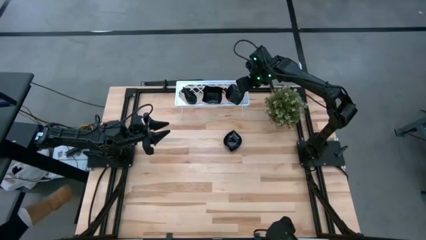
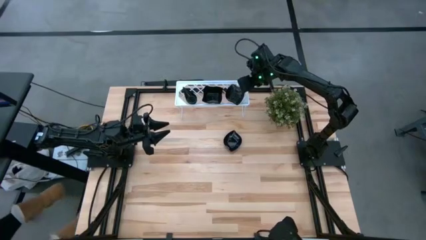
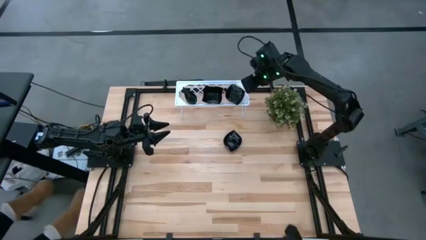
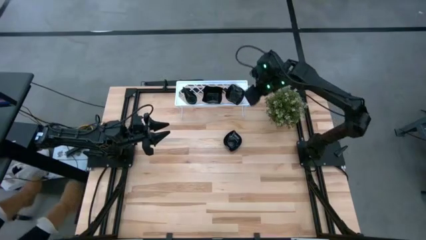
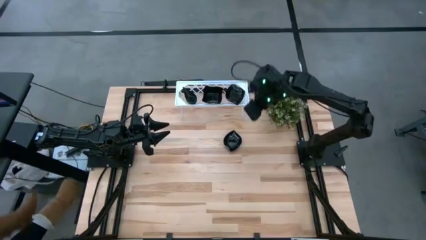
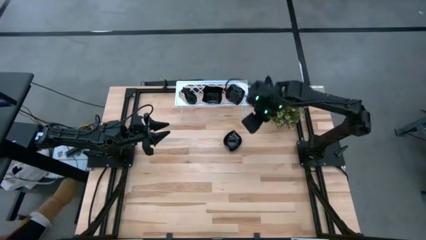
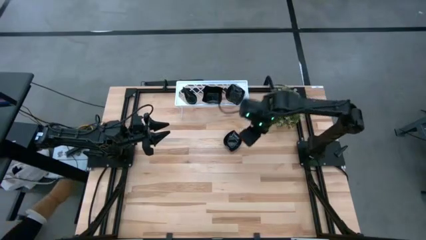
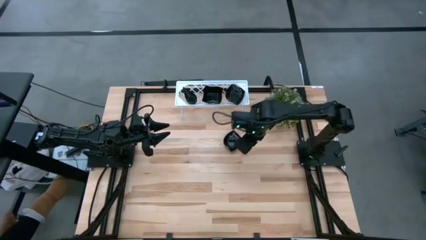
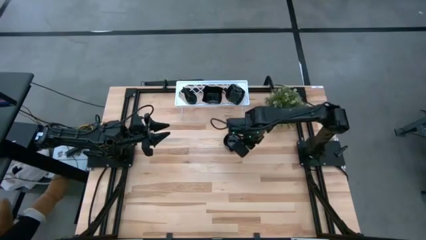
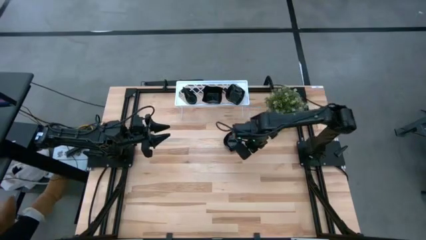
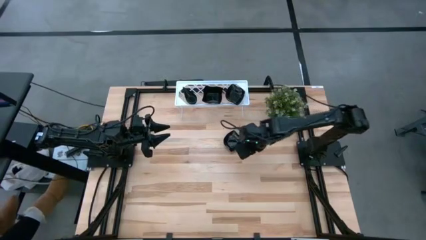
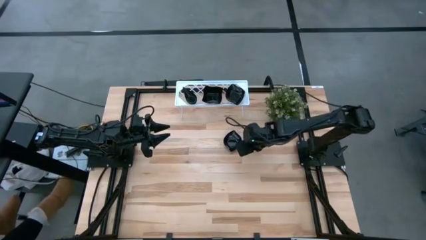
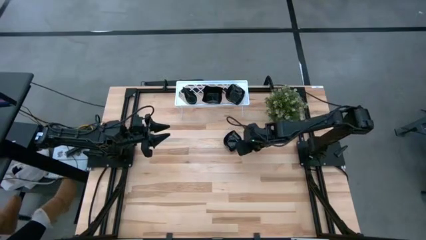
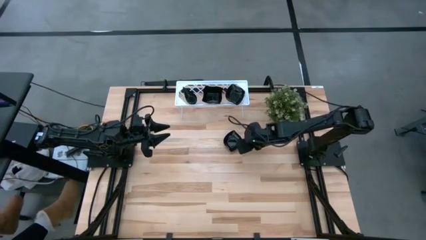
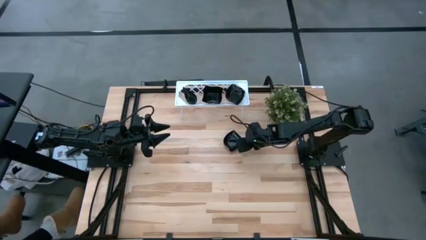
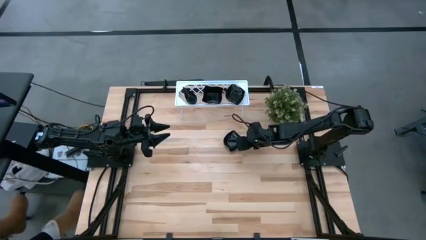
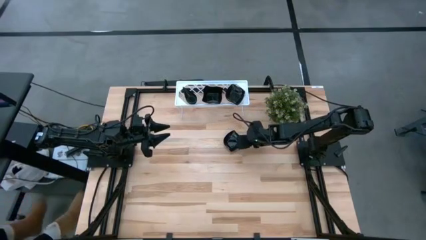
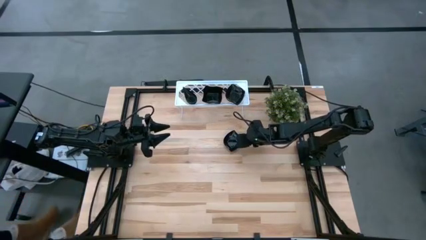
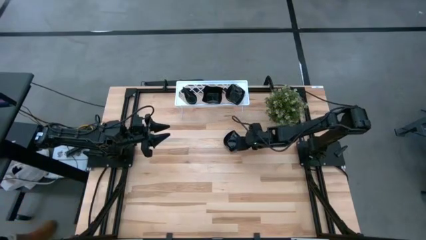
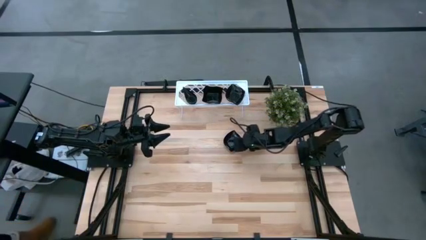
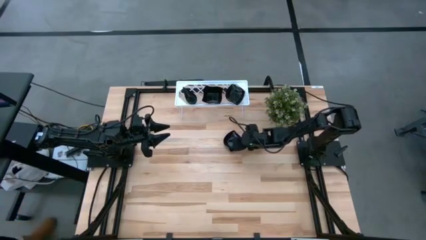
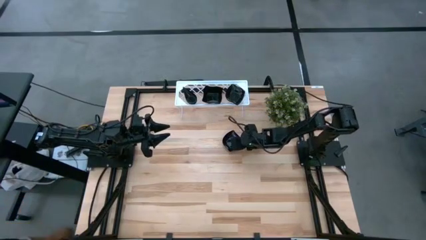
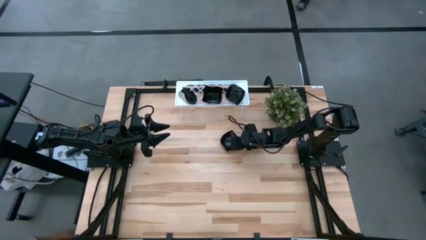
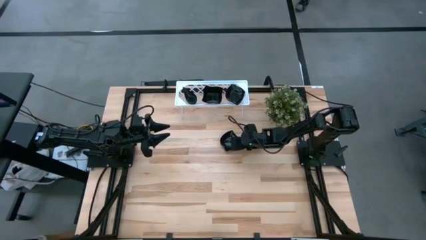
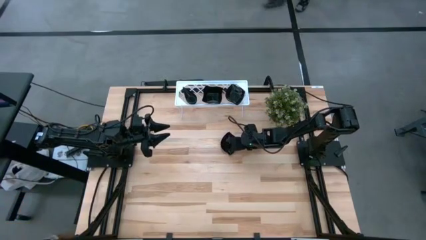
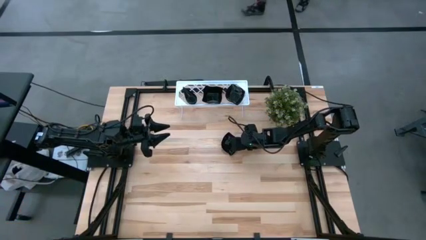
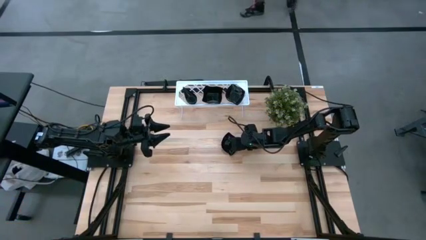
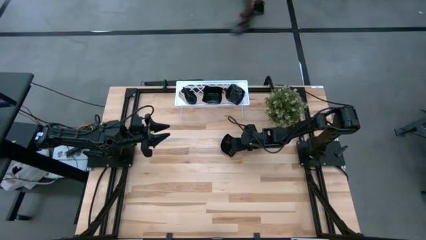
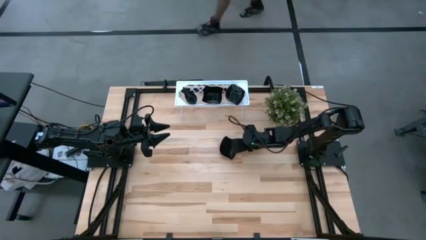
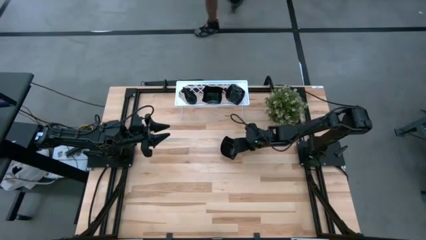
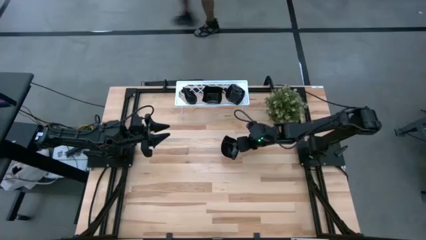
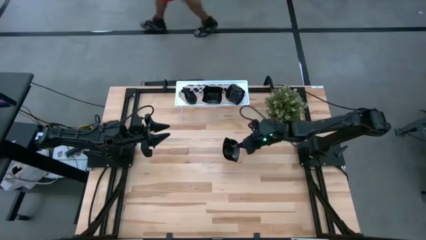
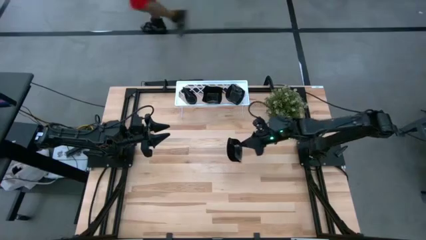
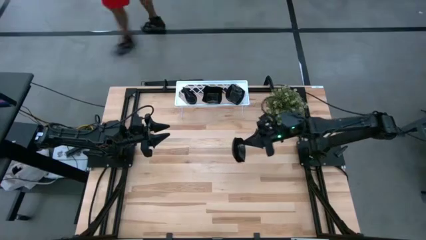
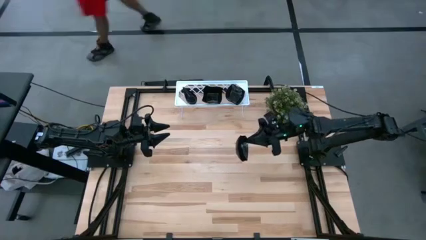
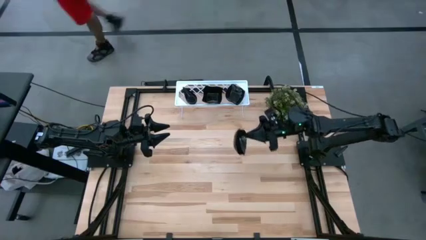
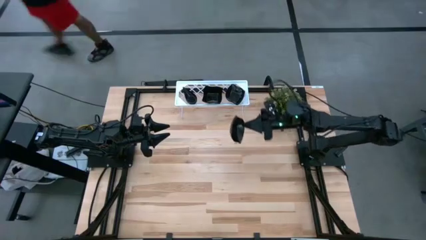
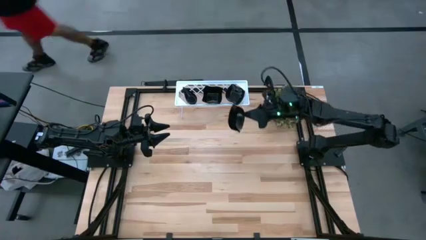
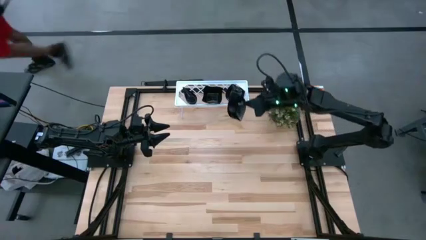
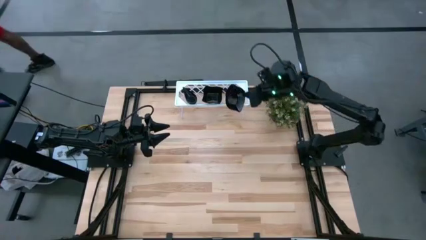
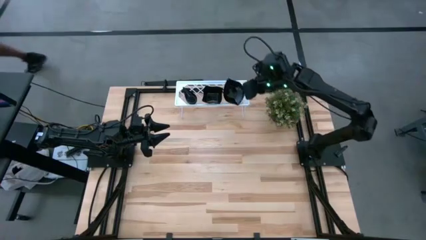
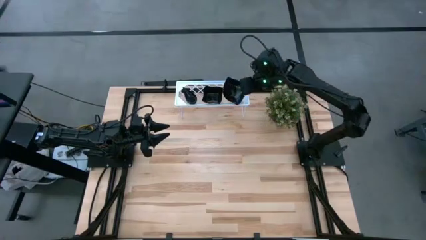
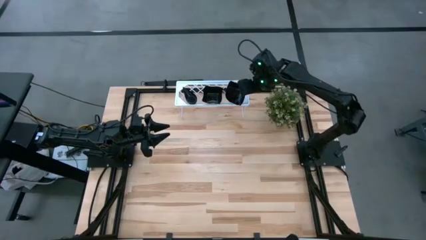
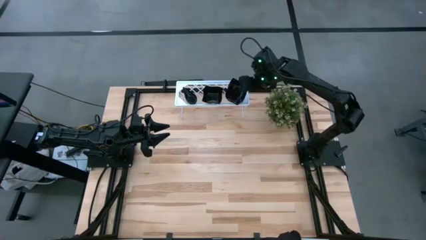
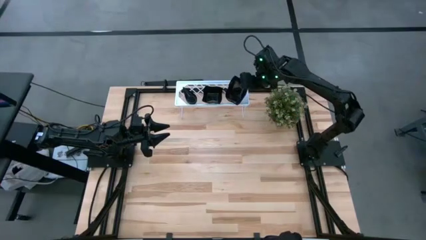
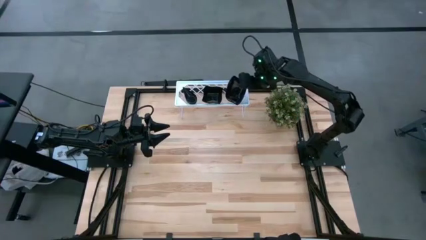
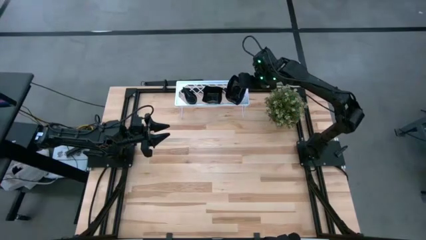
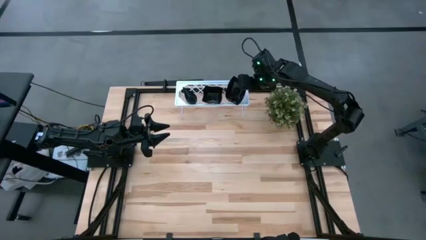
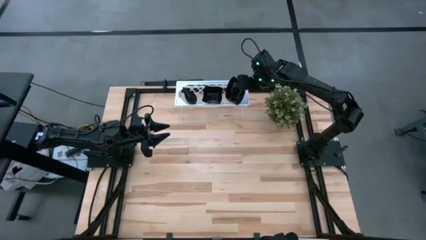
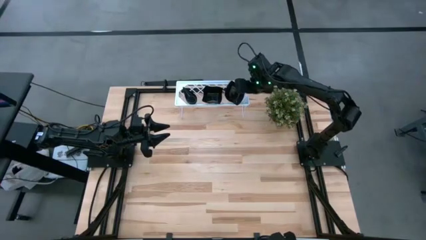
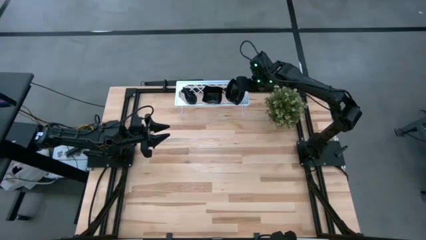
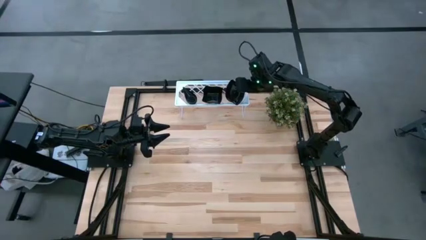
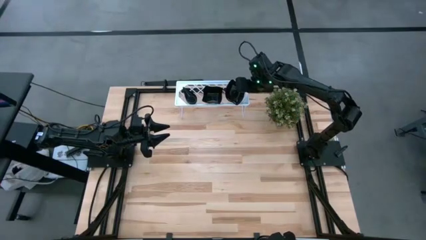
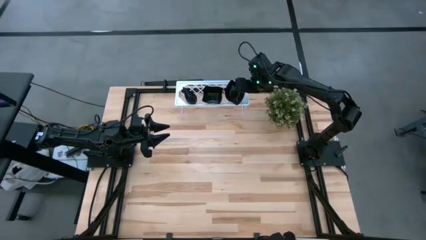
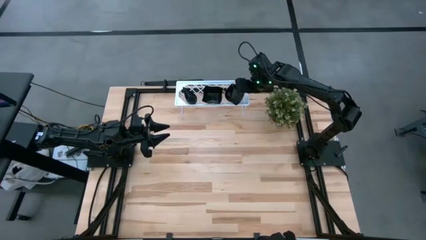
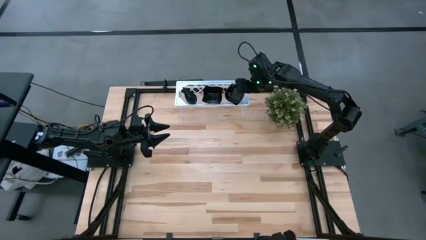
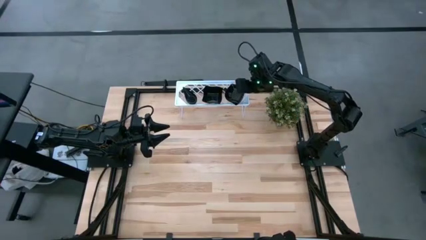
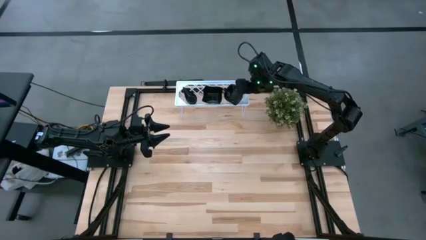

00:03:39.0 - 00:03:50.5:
Task: Pick & Place Mini shaped plates
Stack the leaf shaped plate on top of the leaf shaped plates on the shelf

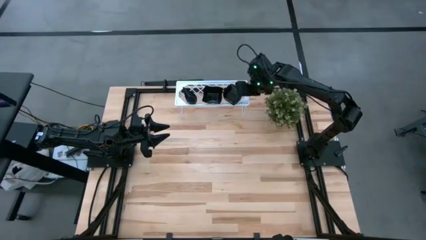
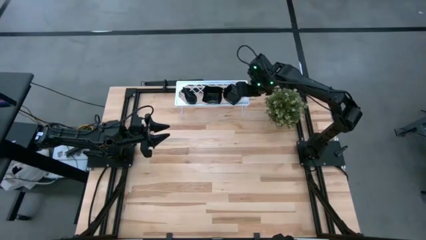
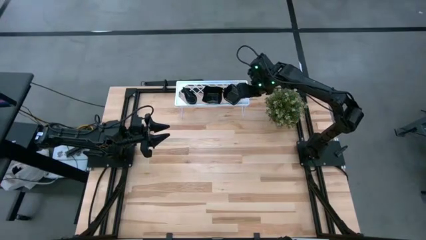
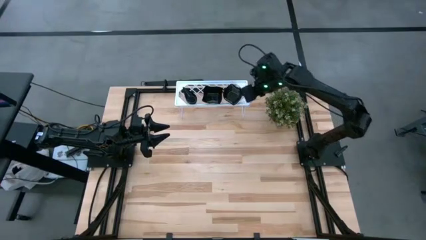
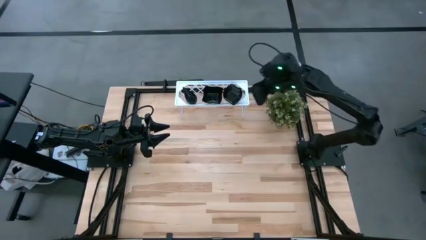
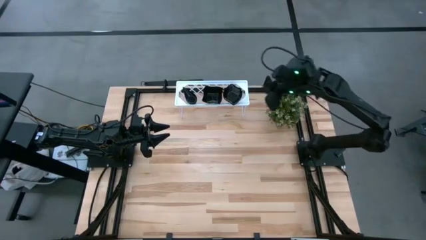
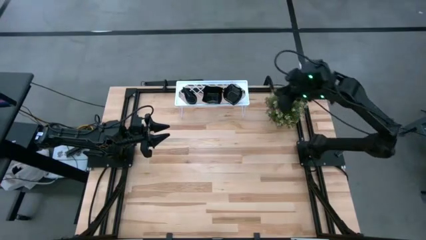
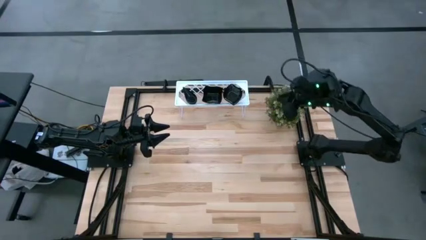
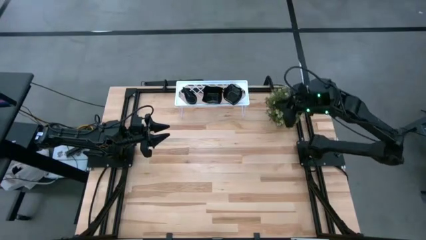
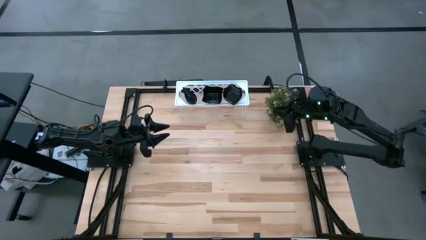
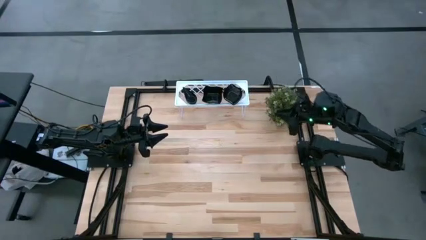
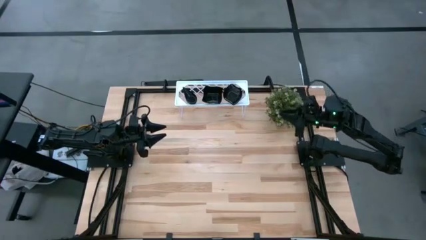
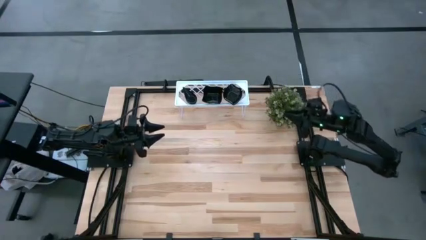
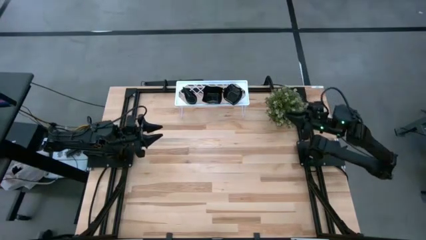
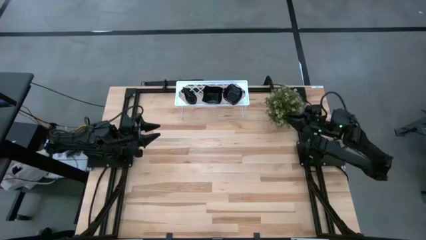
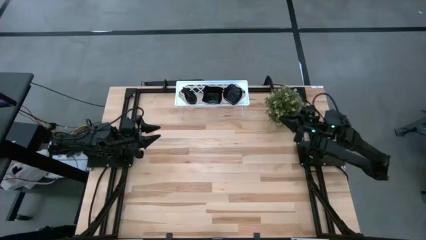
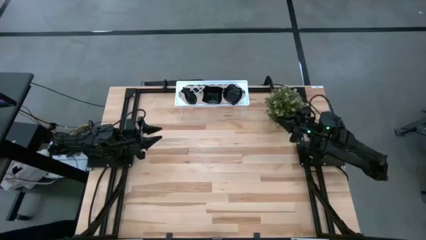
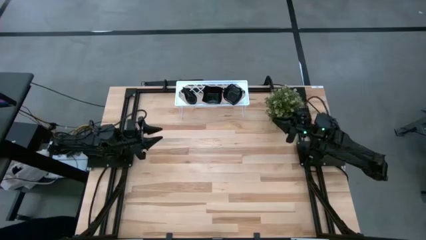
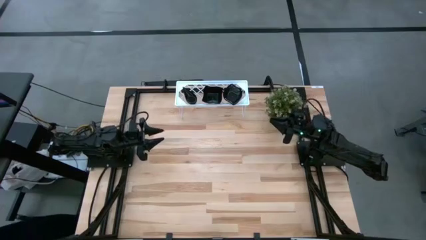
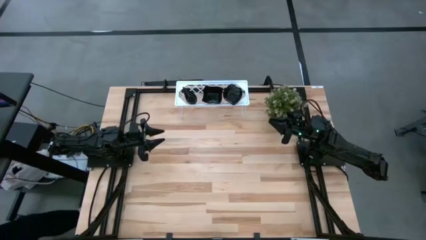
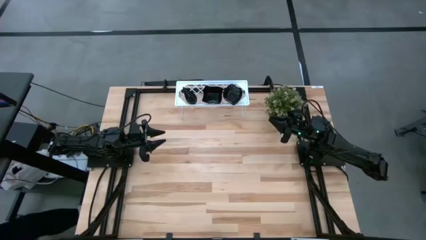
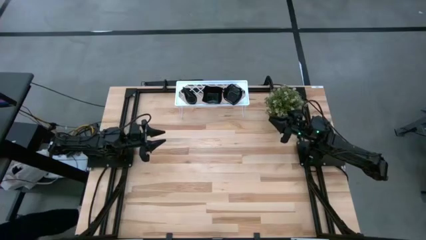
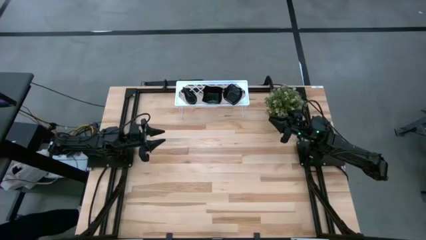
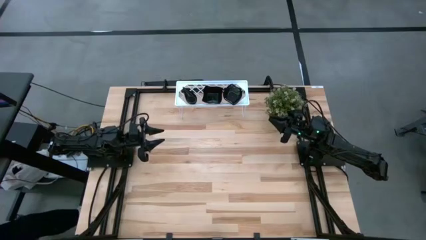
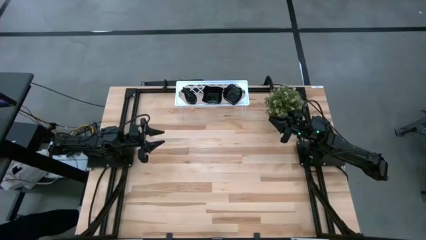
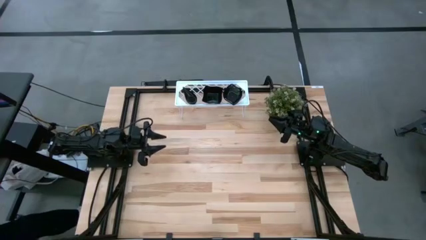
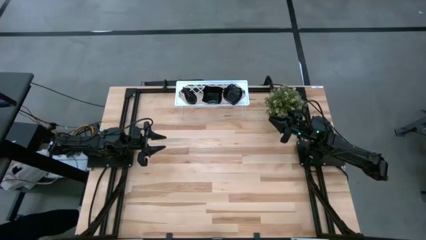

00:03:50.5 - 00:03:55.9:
Return to Home Position
